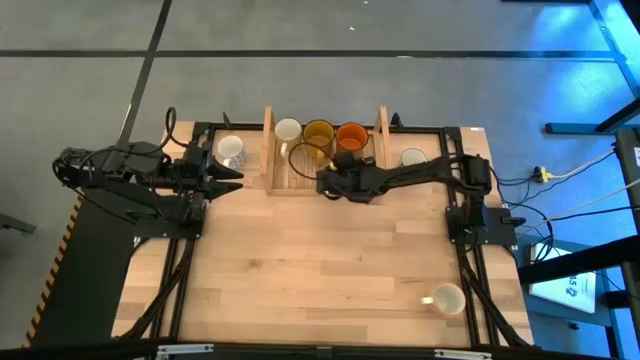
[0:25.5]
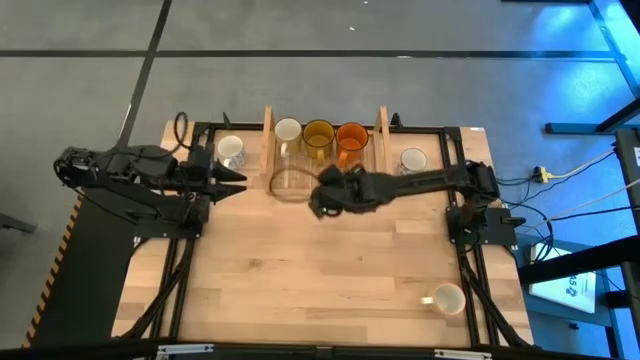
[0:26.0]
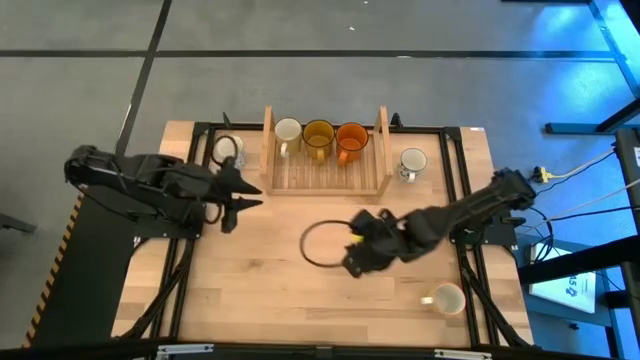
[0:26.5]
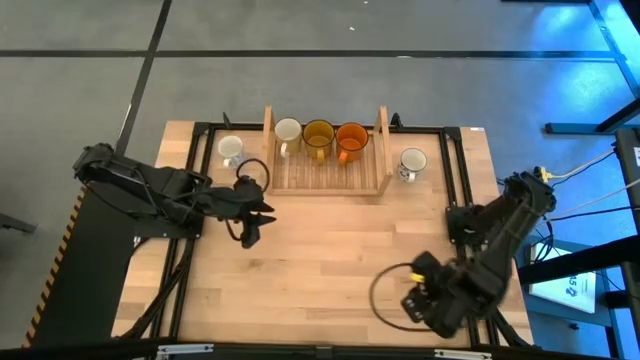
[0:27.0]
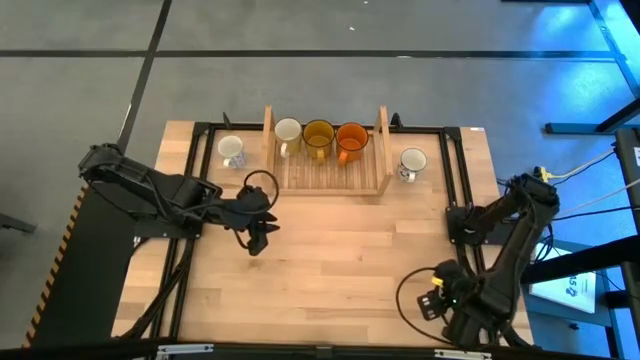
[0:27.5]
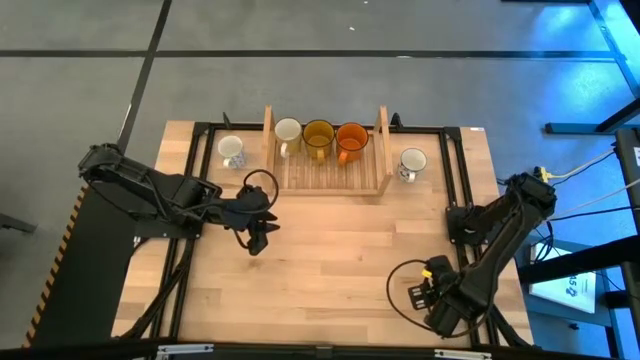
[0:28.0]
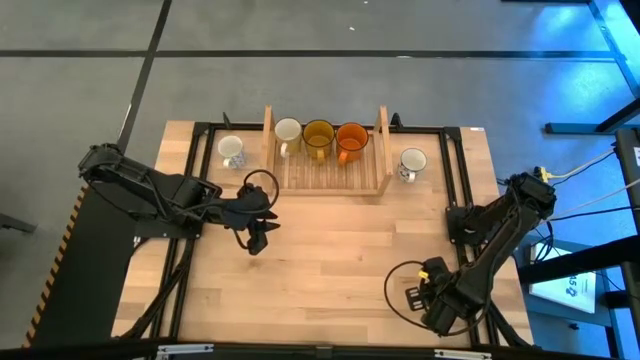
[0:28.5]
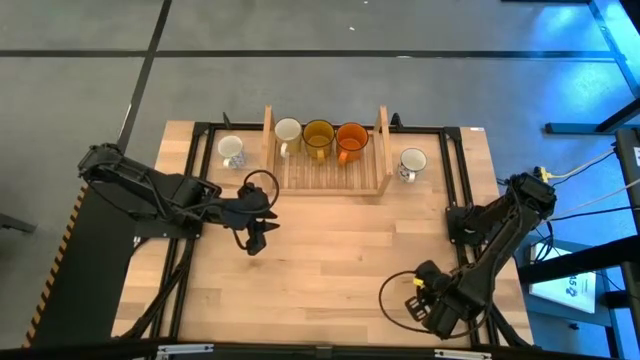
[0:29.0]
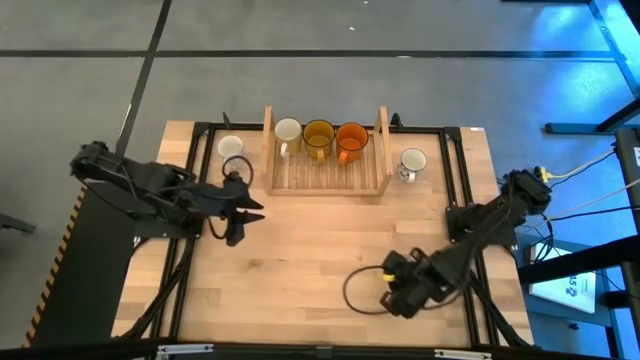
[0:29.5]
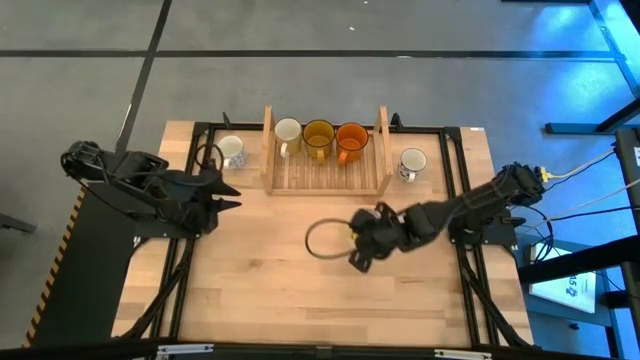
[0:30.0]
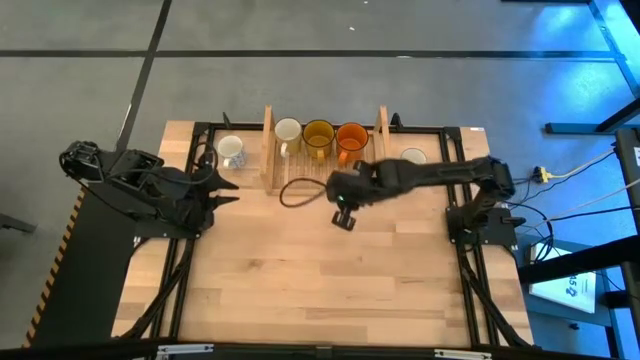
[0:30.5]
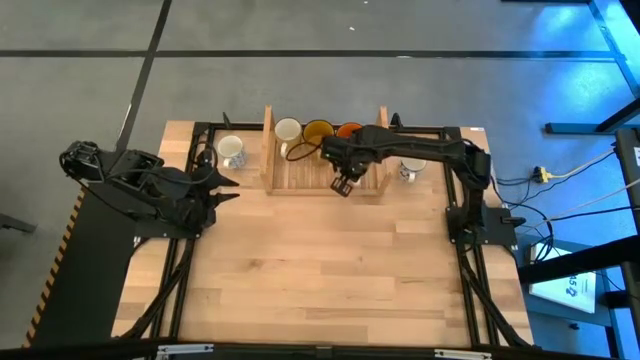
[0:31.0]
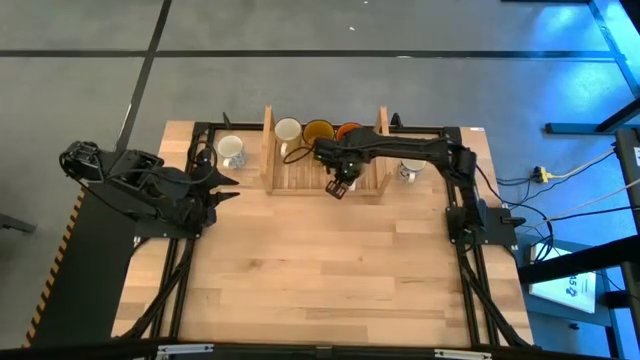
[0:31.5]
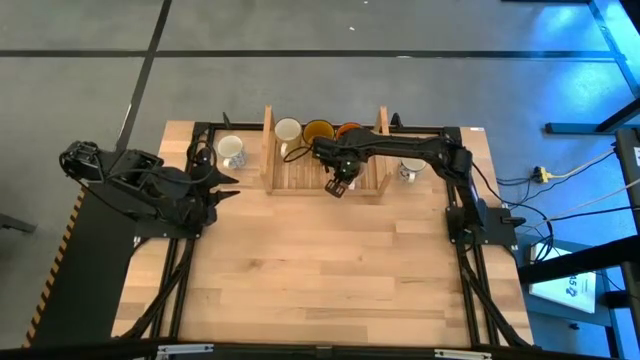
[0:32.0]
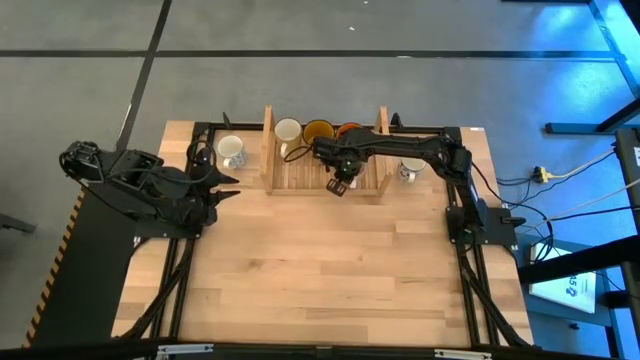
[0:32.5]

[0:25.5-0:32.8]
Task: Place coffee mugs
Put the patterned yellow mug on the shelf

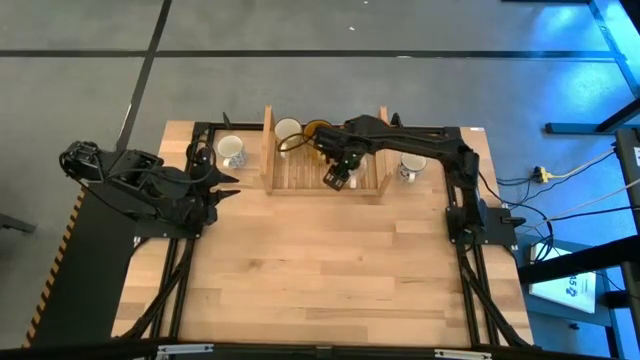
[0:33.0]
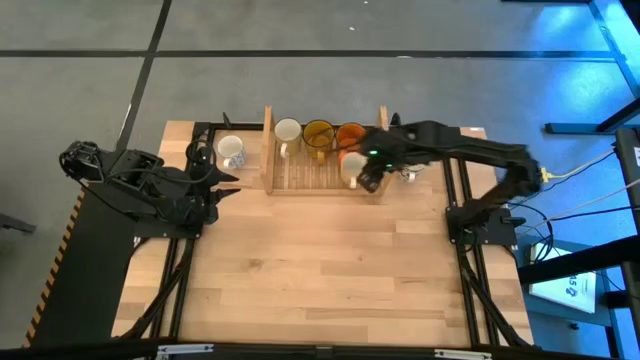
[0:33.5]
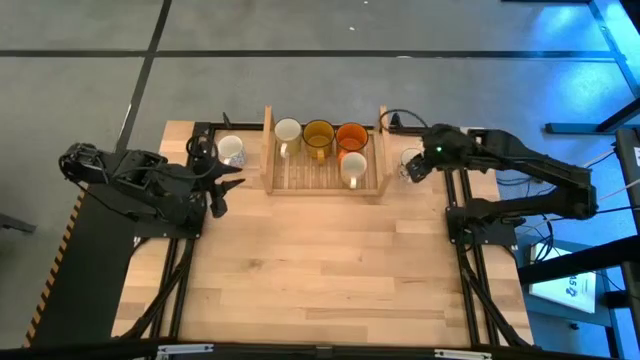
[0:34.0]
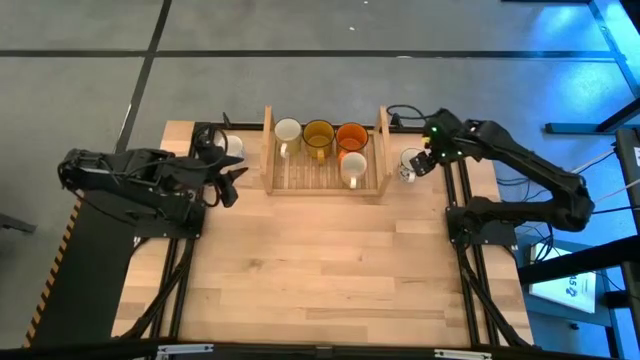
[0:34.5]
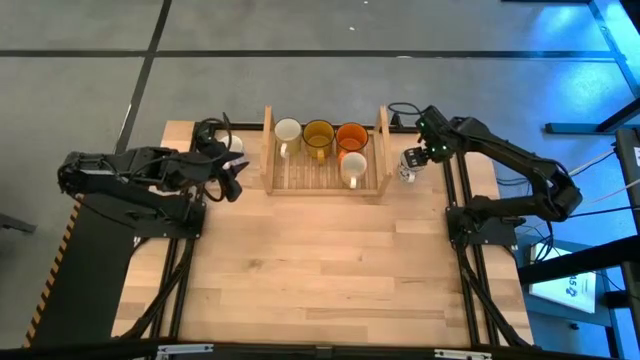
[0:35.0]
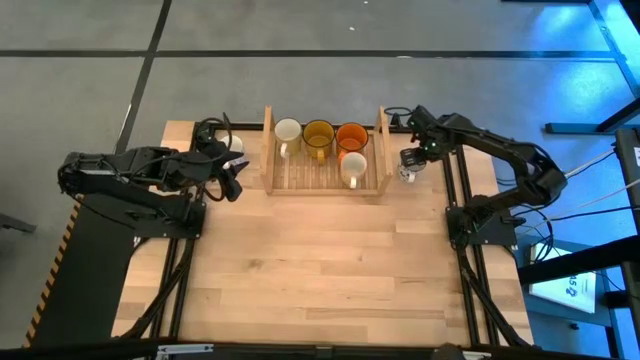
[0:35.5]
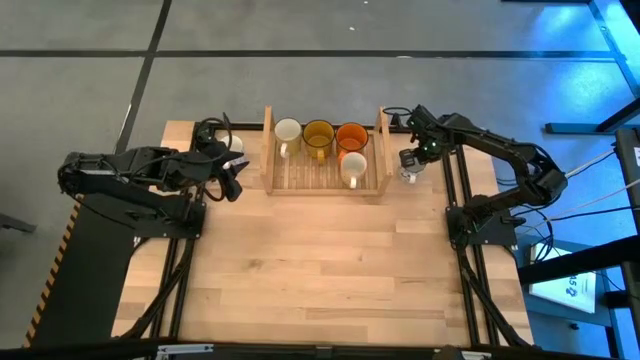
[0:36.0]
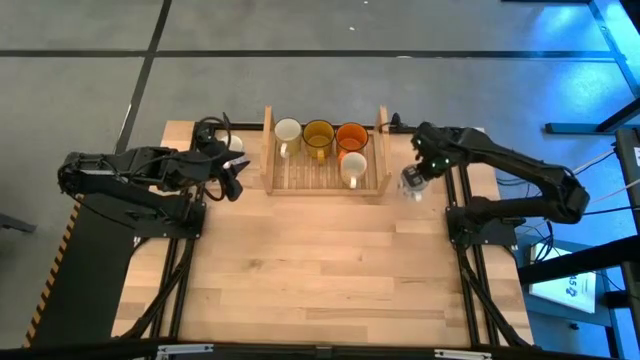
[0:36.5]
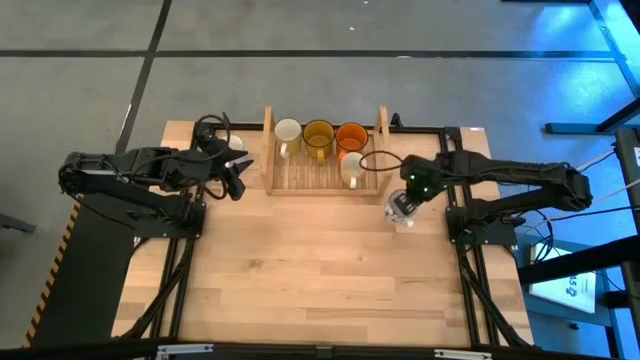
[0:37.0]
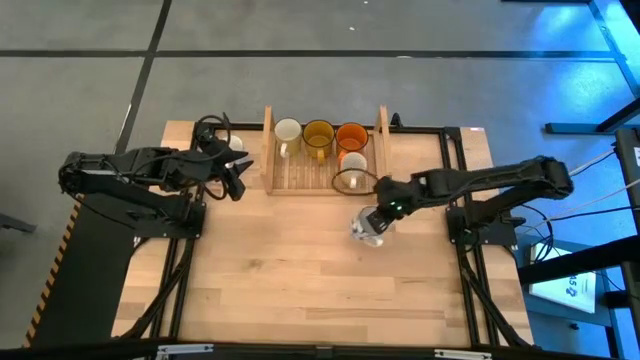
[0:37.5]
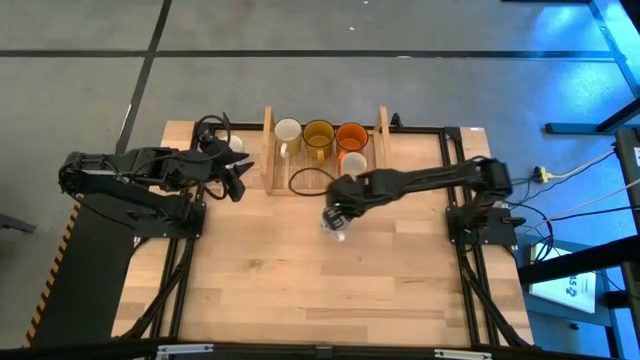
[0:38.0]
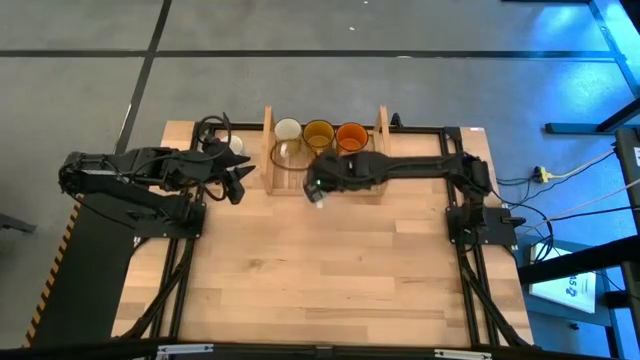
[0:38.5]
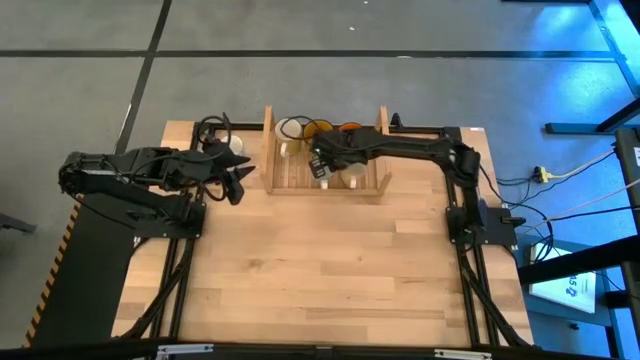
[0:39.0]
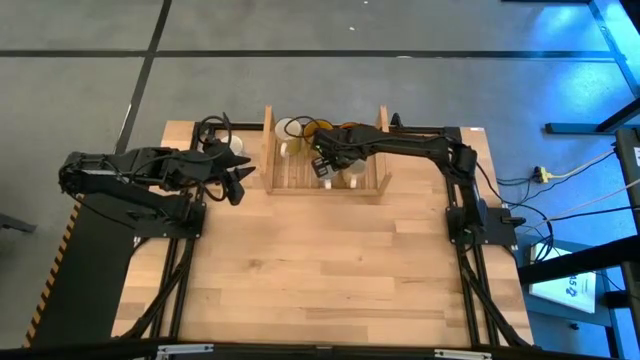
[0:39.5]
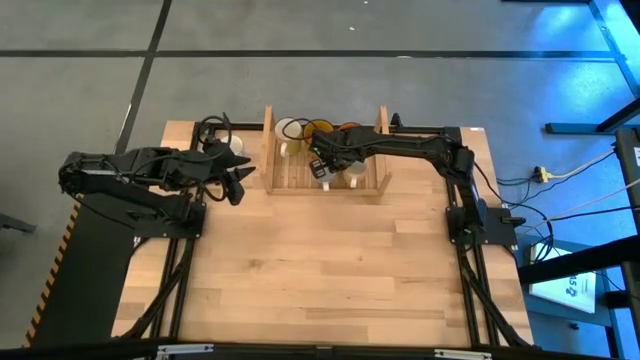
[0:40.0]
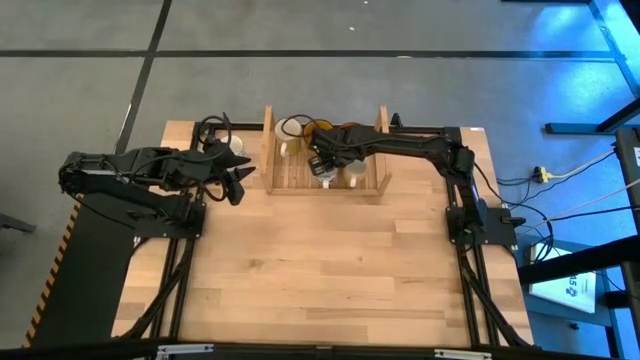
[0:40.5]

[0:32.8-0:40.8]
Put the0 patterned blue mug on the shelf

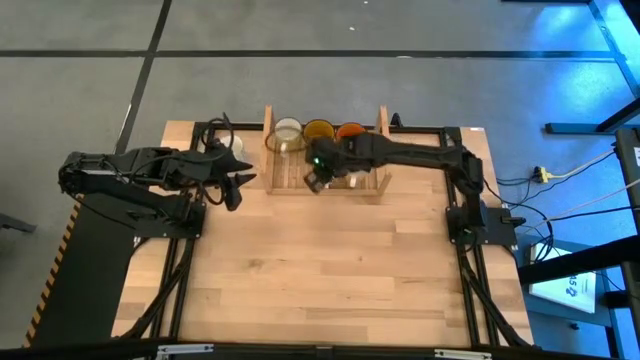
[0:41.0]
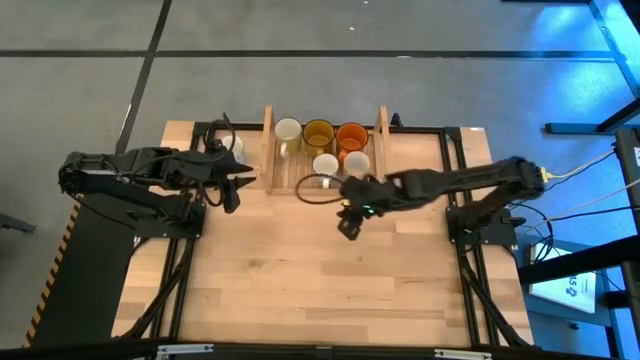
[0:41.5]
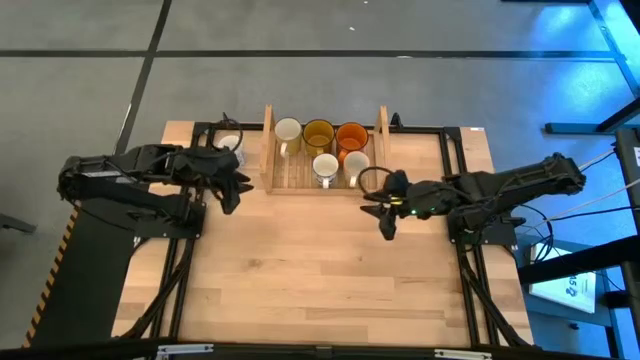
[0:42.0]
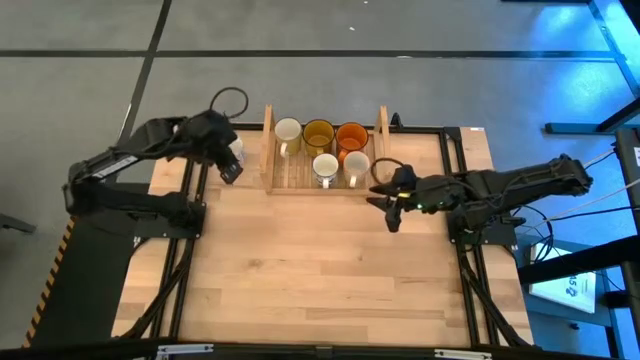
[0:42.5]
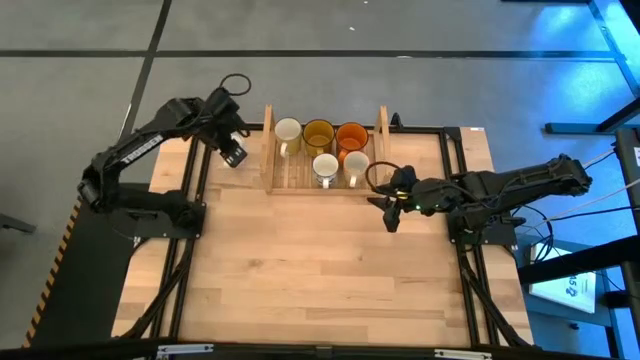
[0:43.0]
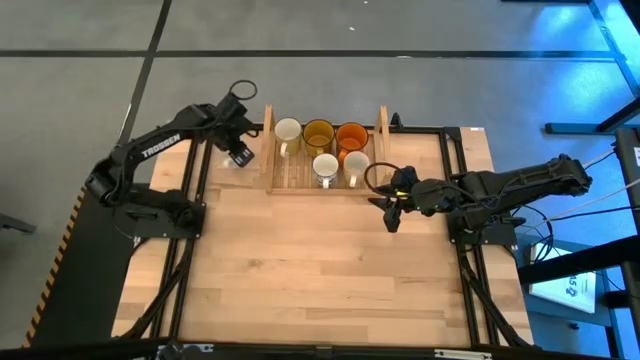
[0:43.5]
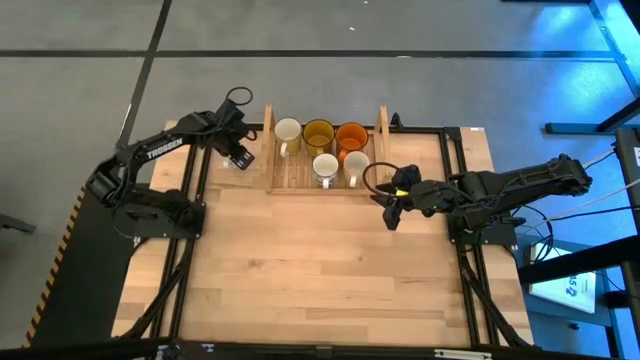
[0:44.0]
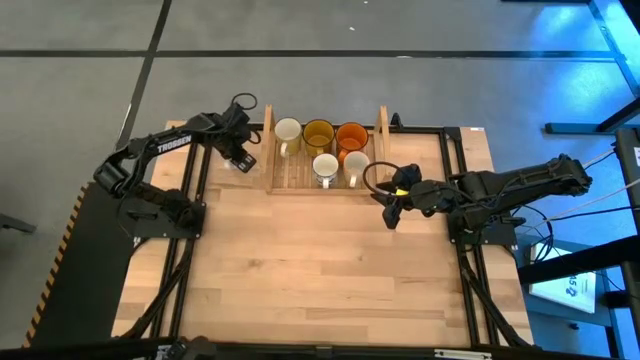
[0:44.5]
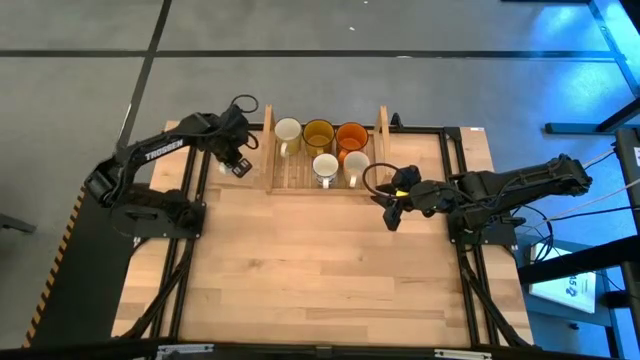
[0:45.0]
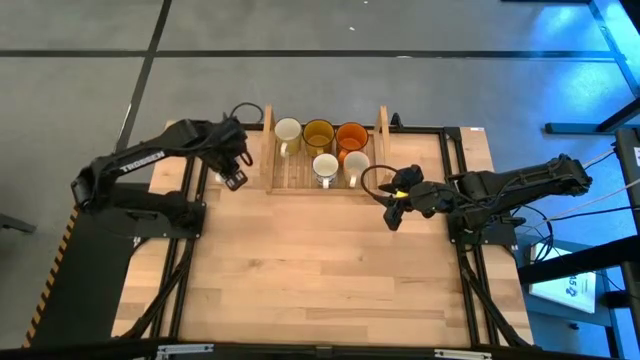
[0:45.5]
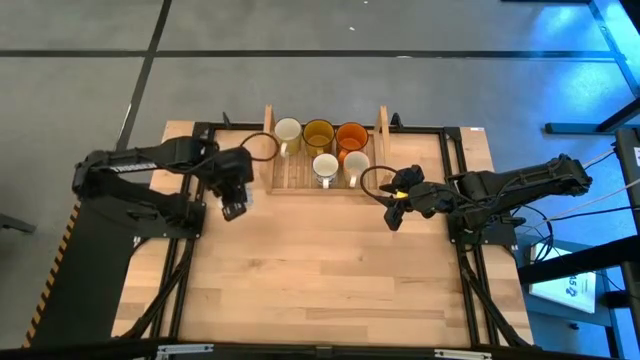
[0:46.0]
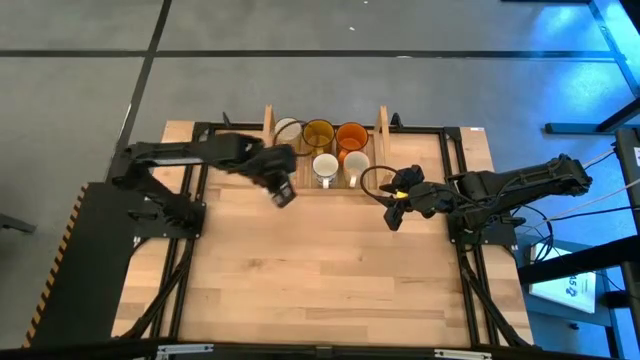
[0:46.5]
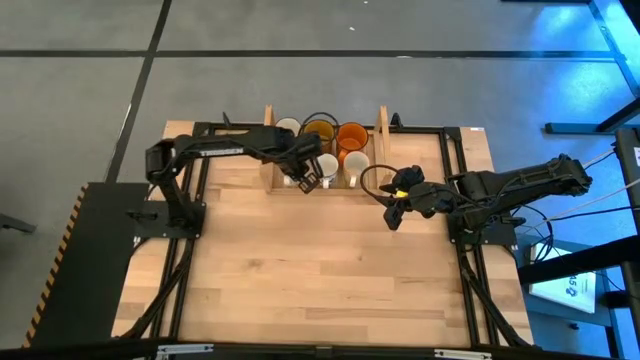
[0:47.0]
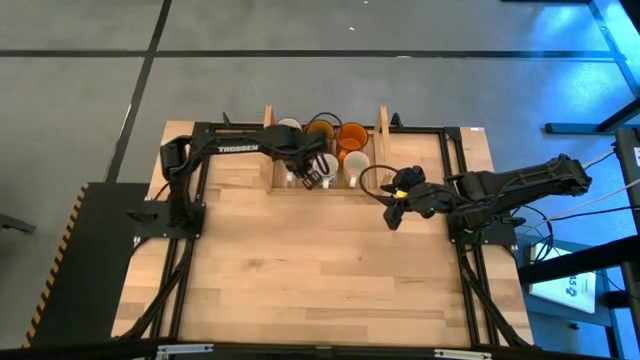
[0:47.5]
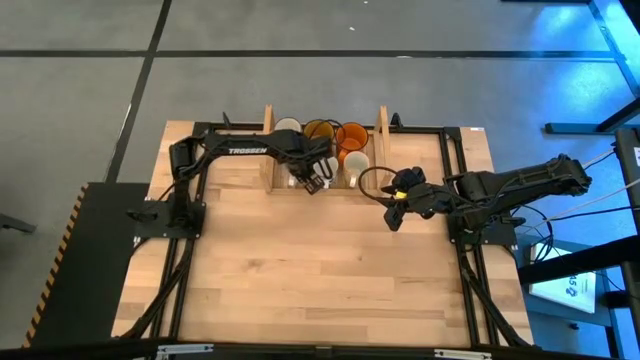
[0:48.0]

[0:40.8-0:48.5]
Put the patterned light blue mug on the shelf
